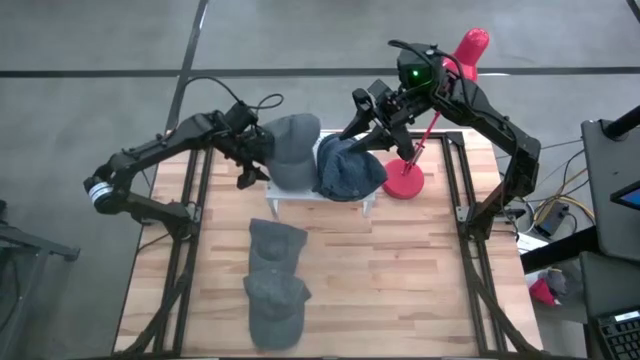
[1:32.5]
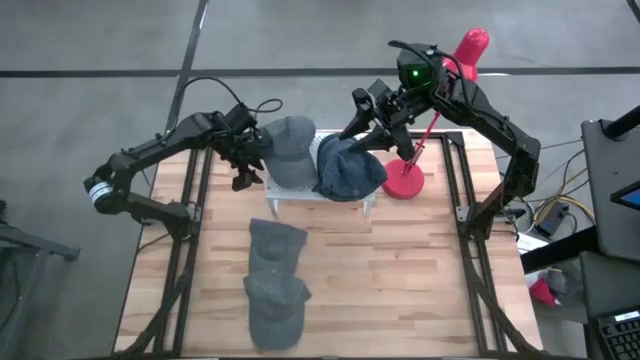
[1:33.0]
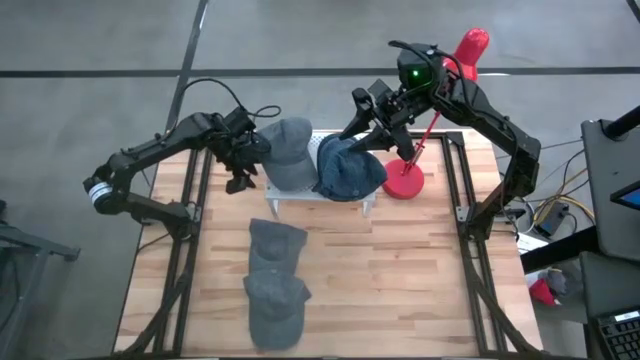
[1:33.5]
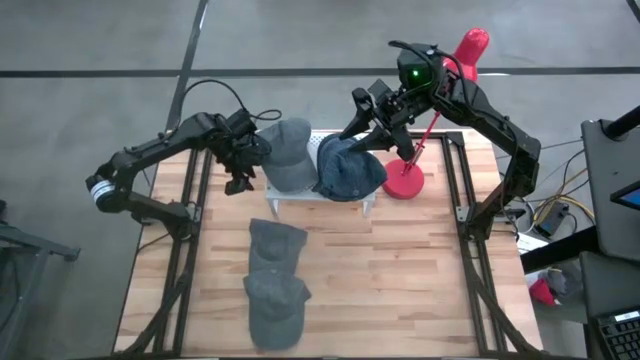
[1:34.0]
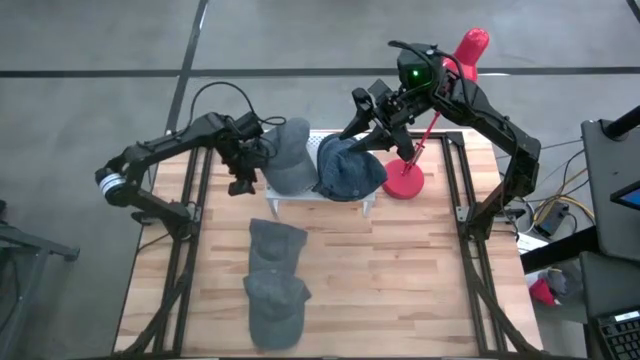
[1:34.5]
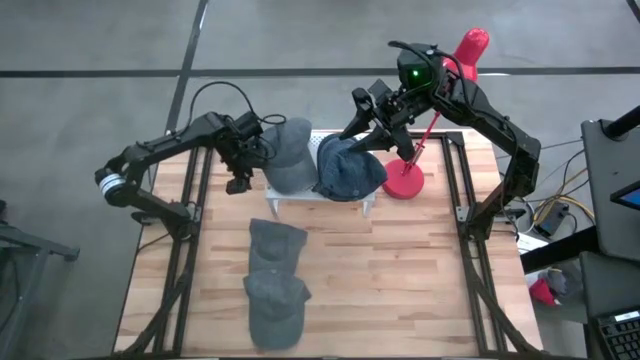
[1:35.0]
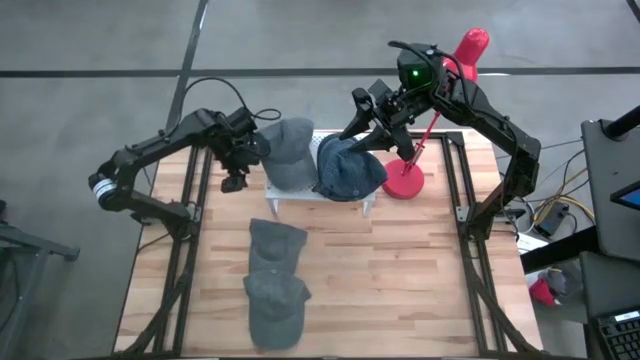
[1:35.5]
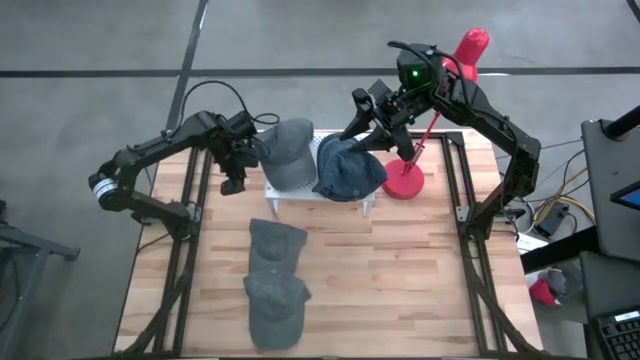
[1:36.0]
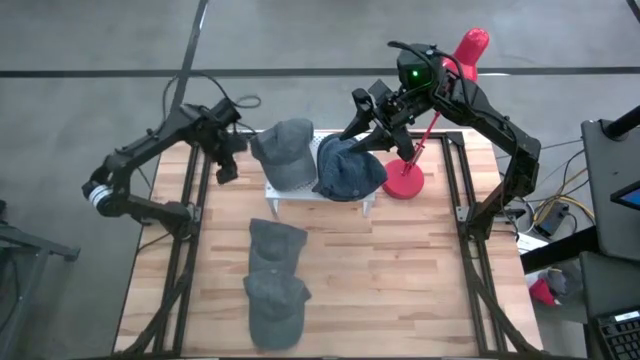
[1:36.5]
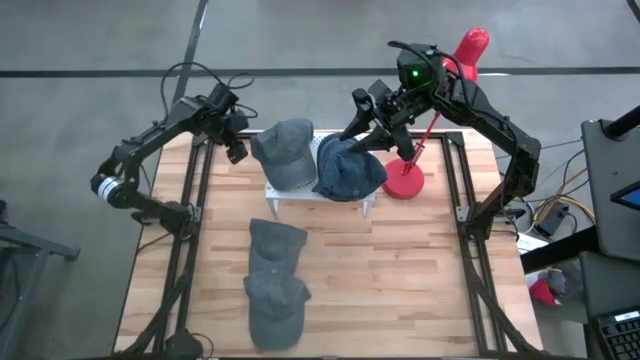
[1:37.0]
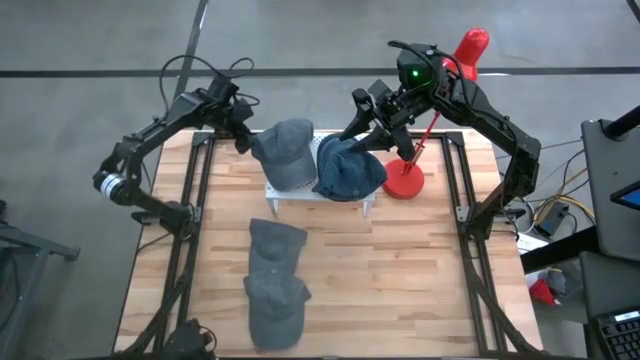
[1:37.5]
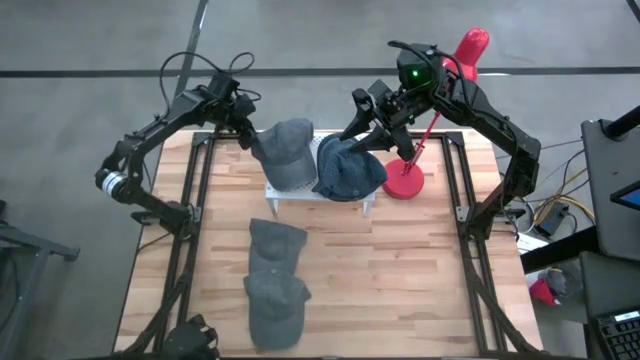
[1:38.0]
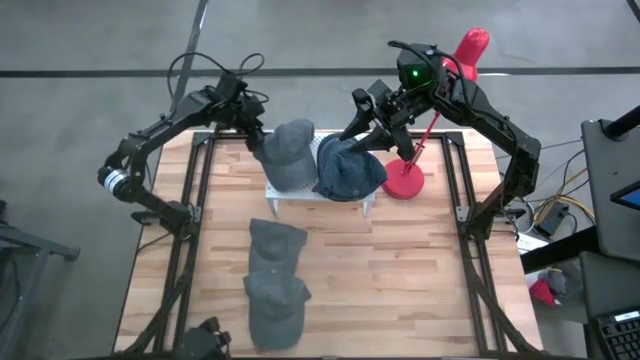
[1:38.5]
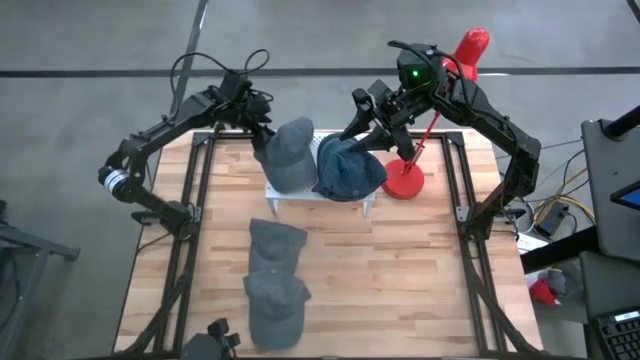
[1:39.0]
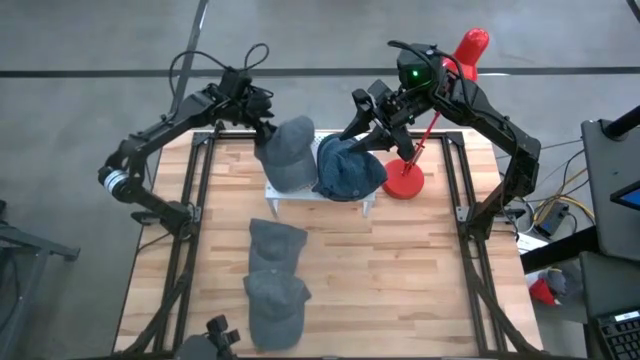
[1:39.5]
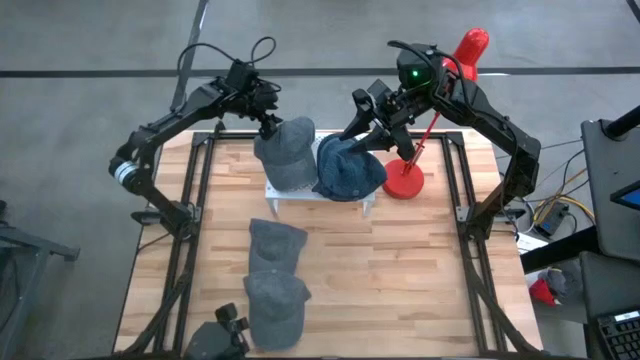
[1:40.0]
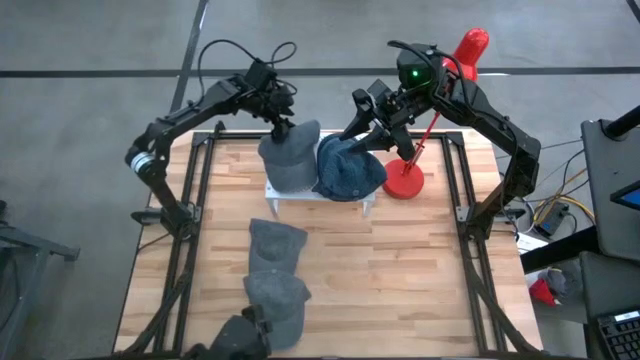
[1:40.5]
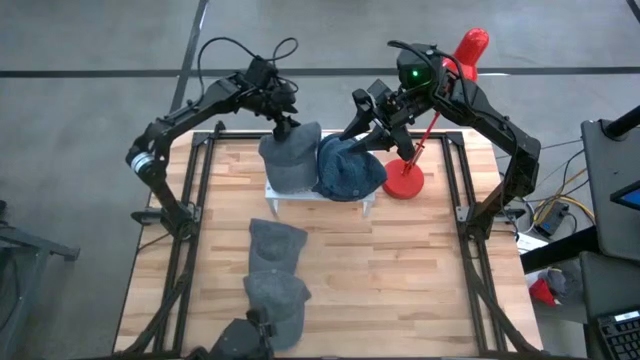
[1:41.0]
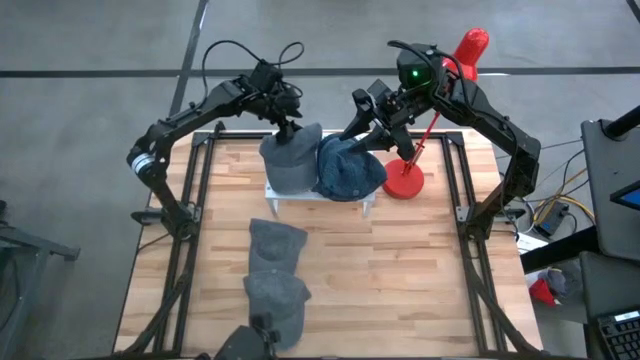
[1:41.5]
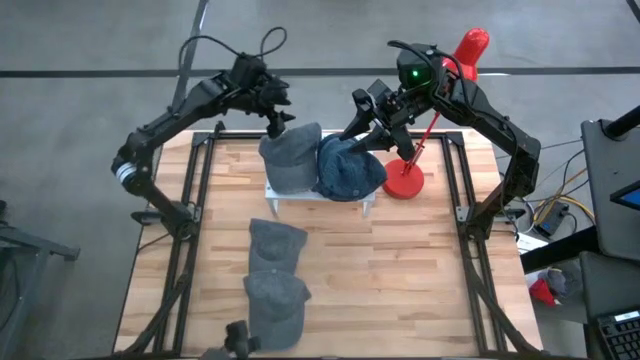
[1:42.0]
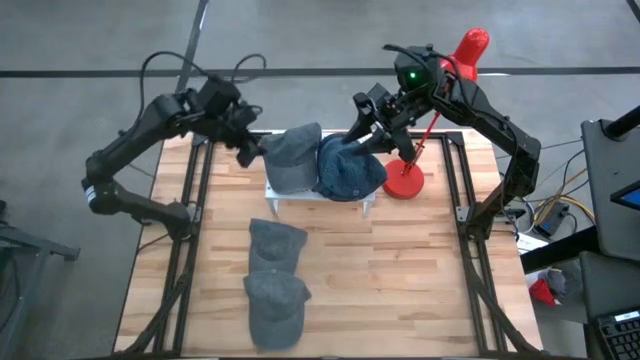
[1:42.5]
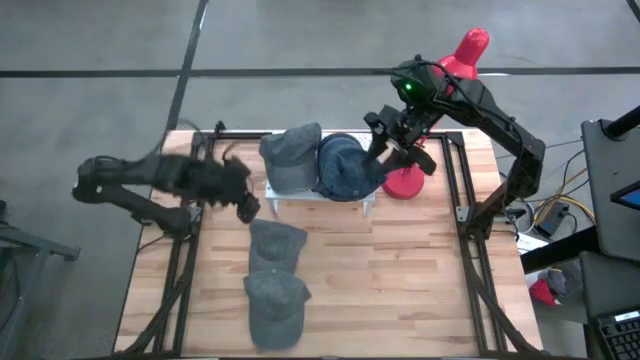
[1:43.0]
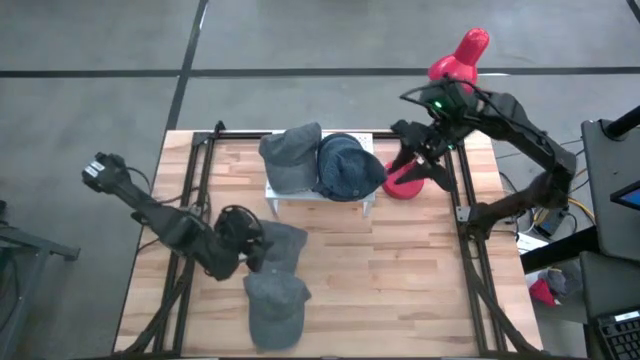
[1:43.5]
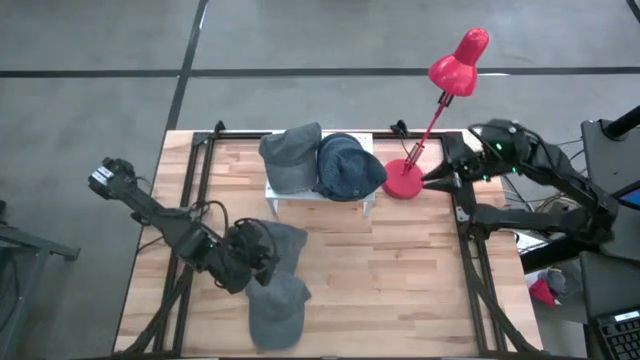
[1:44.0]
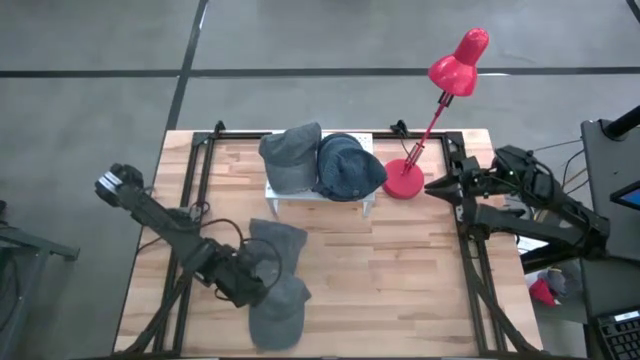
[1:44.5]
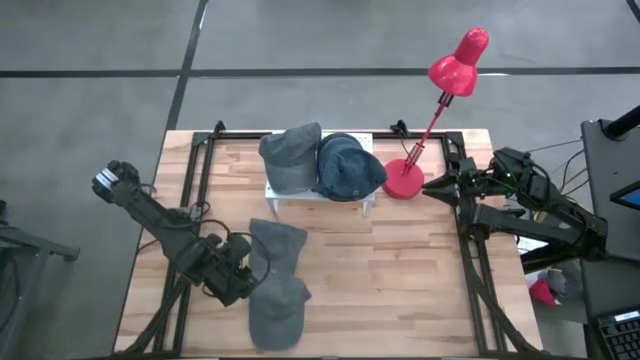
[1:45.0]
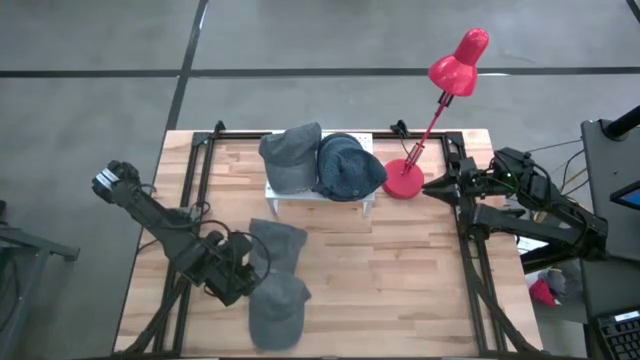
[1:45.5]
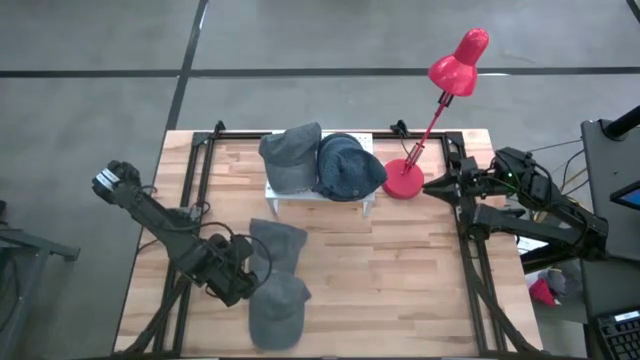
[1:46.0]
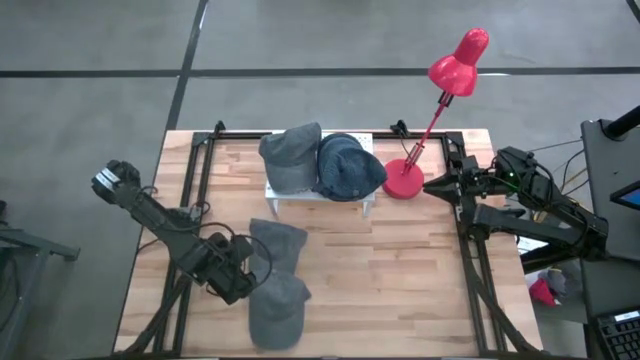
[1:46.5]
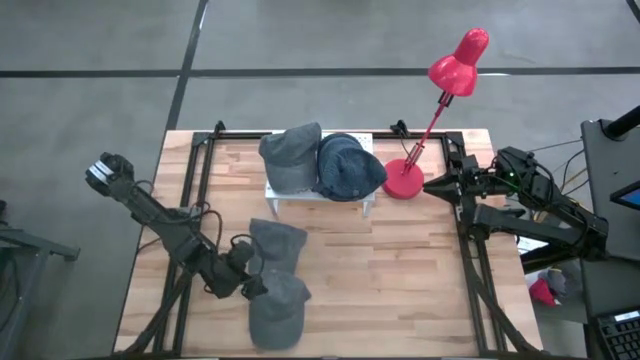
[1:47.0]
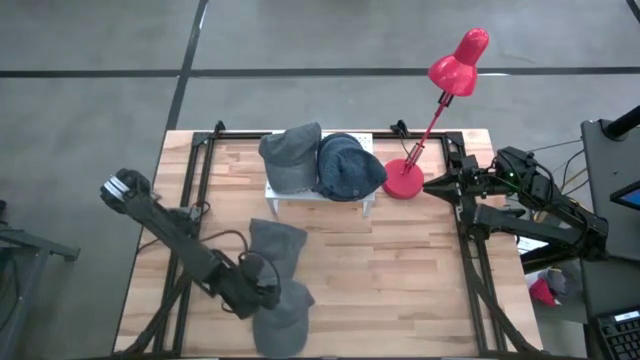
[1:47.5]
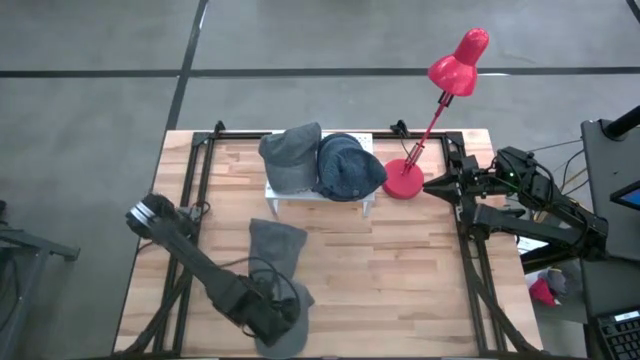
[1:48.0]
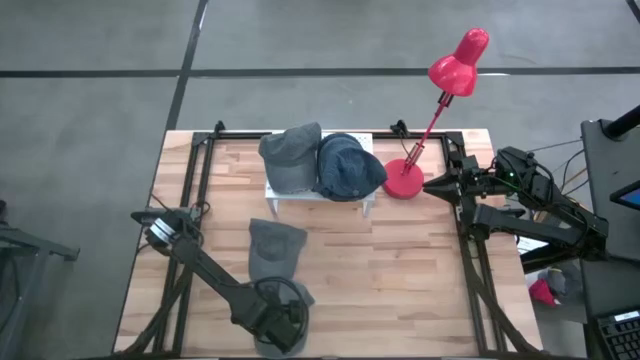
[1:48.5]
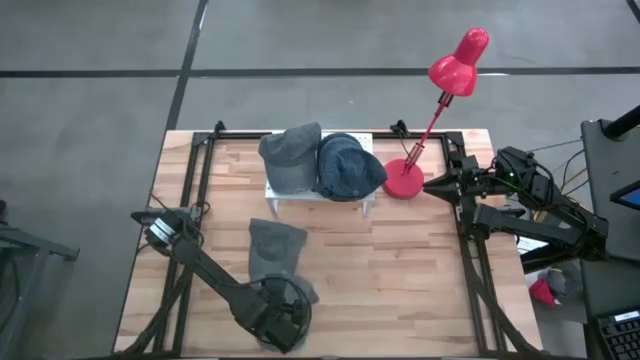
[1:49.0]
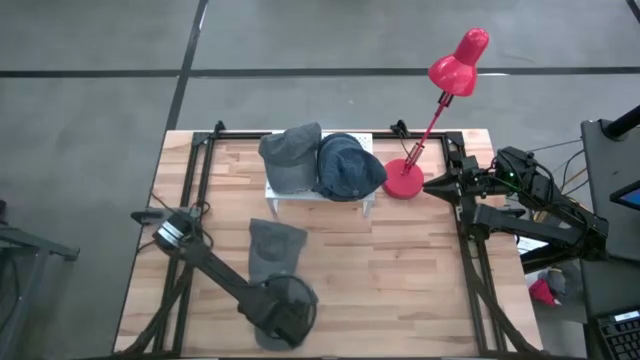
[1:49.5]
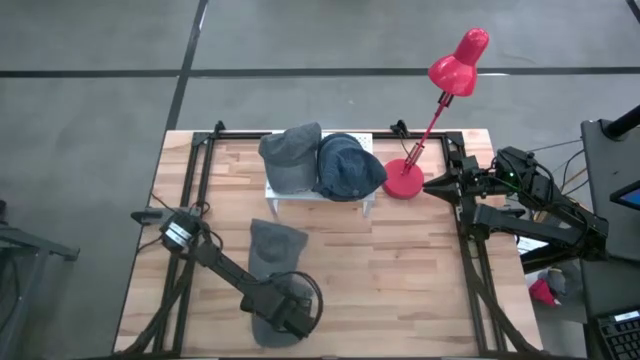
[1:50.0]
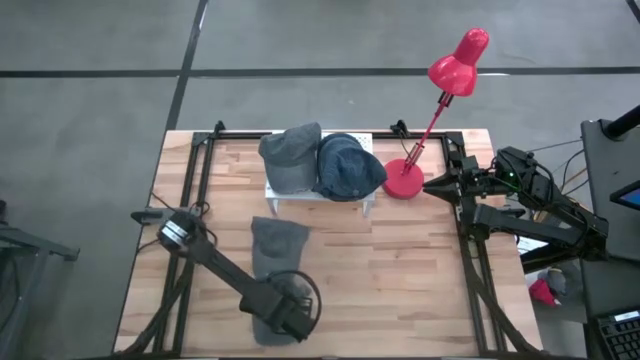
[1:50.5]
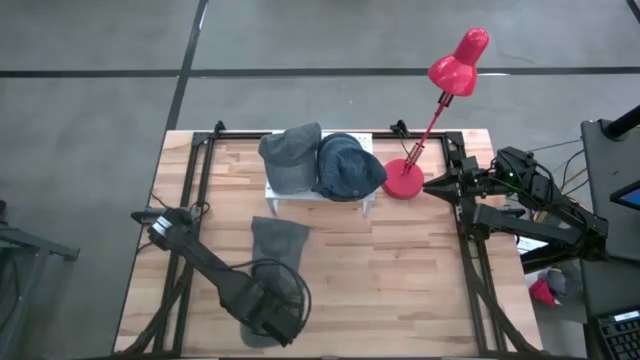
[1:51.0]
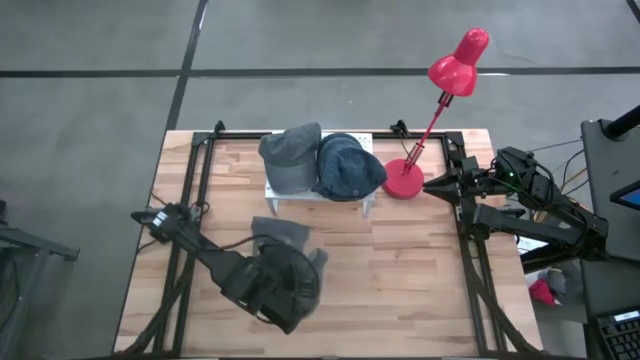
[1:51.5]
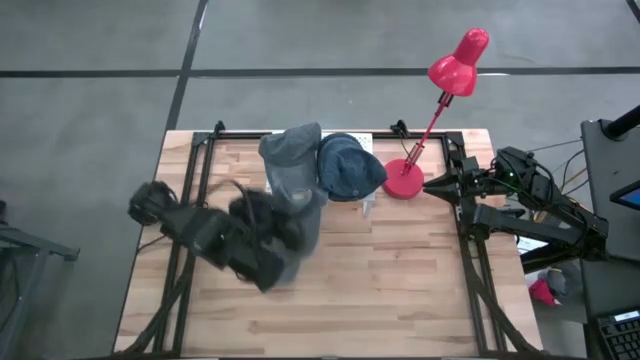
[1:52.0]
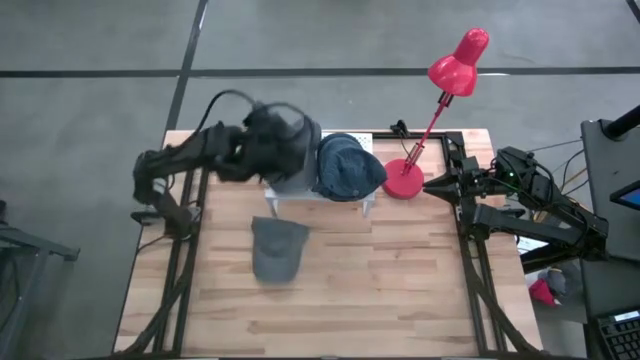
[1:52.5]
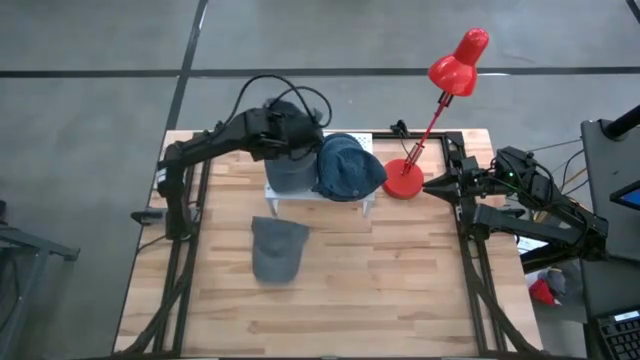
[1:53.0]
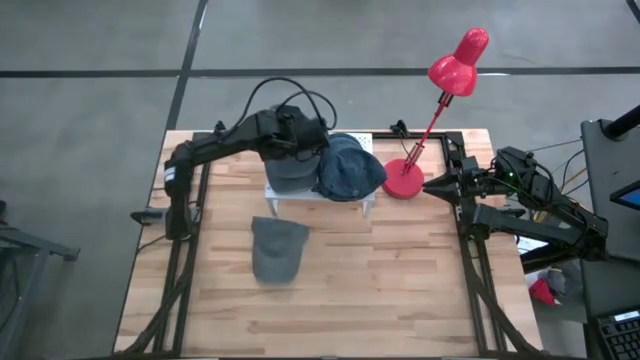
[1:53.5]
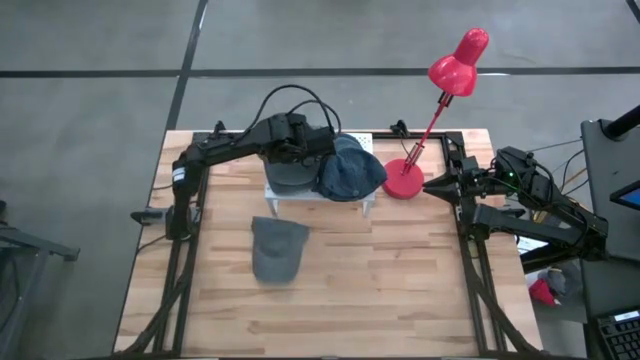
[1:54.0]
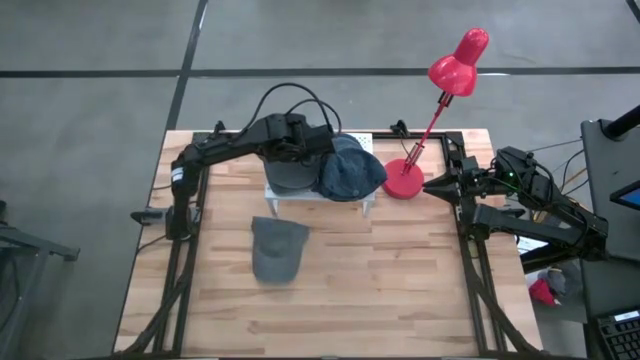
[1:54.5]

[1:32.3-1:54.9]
Task: Pick & Place hat
Stack the bottom gray cap on the gray cap on the shelf
